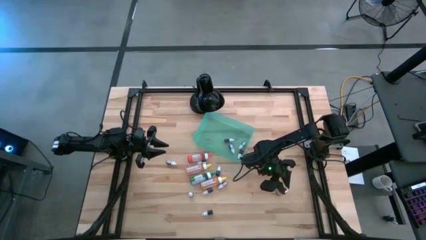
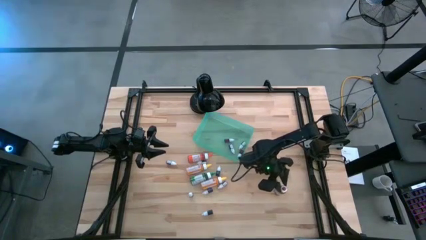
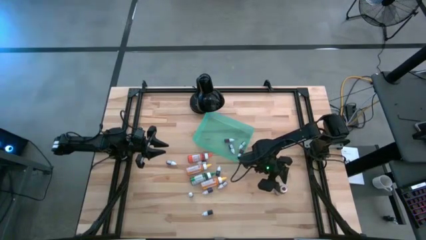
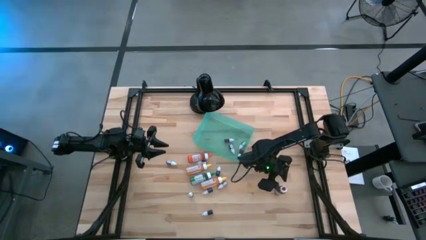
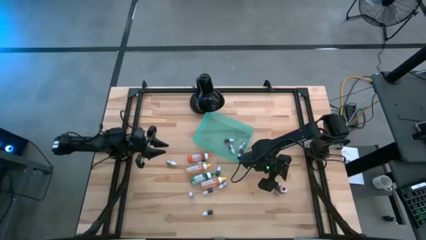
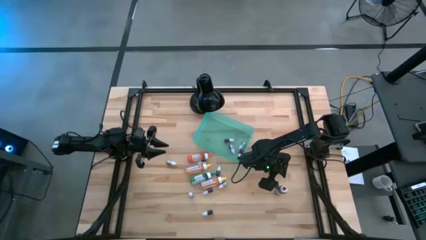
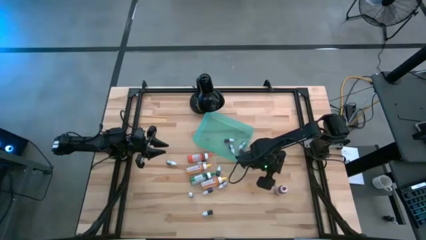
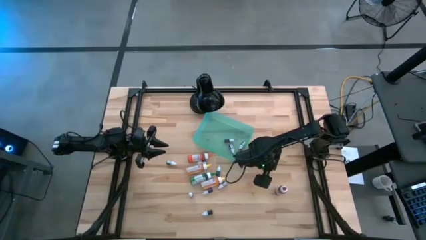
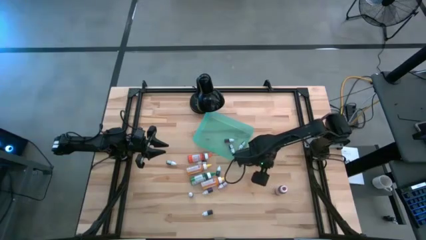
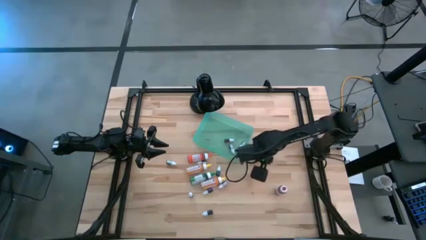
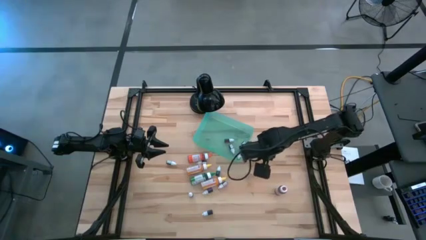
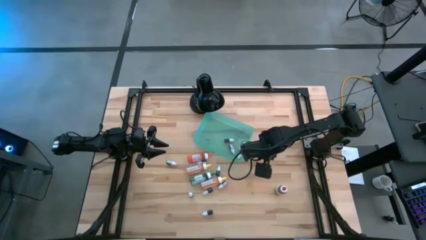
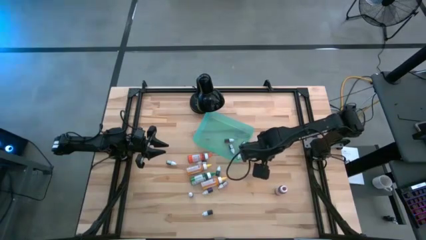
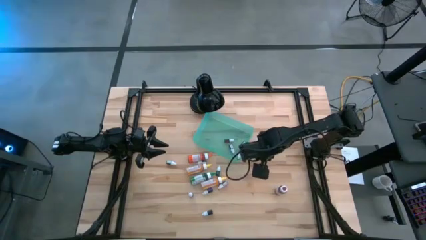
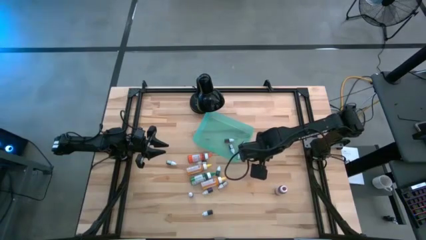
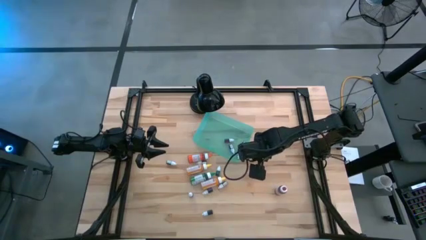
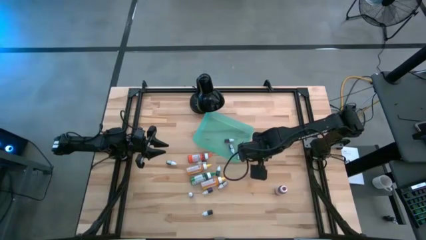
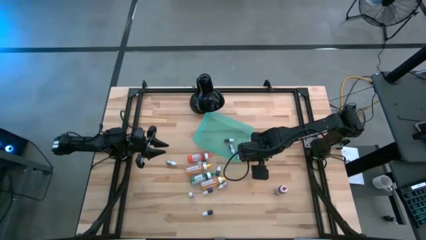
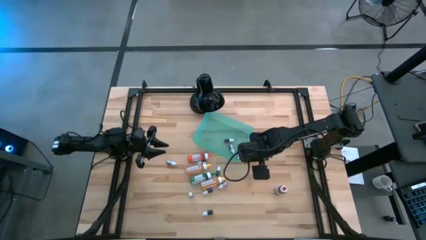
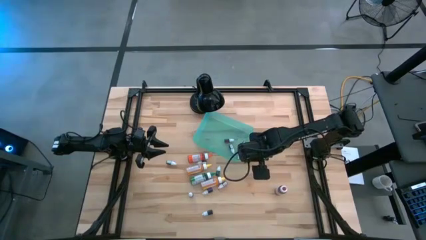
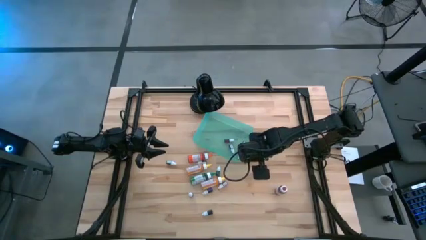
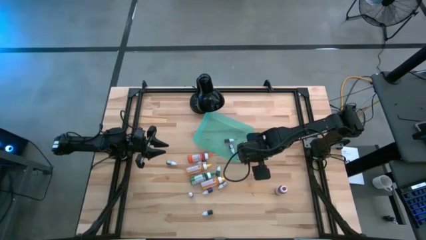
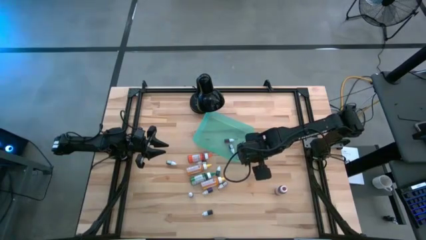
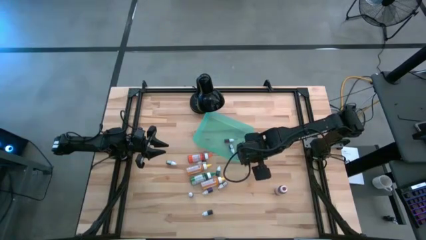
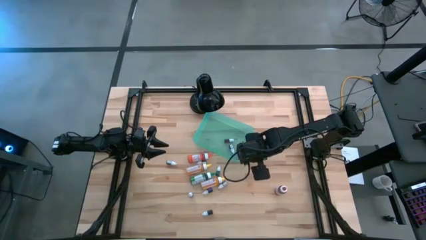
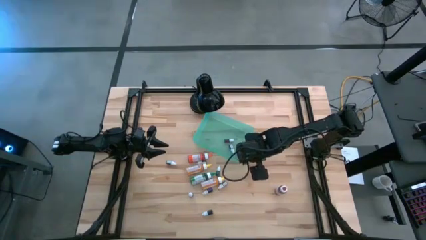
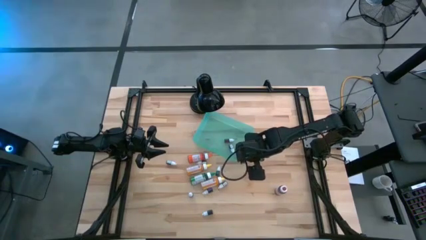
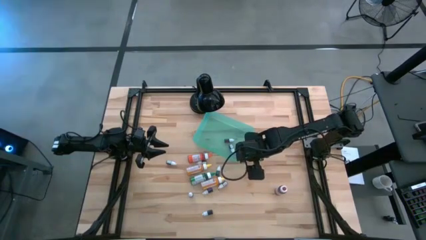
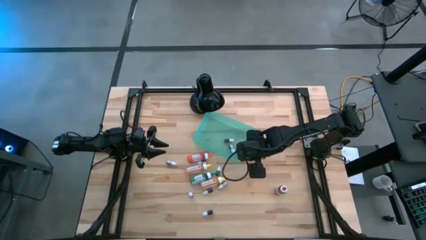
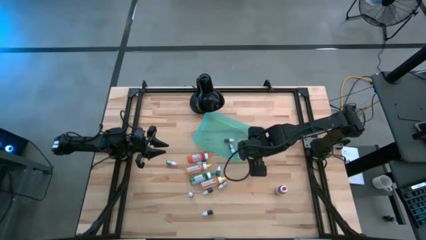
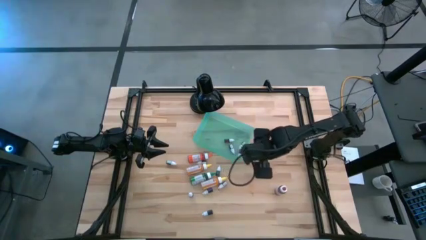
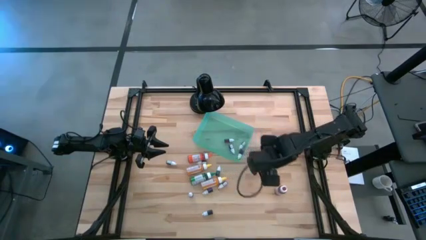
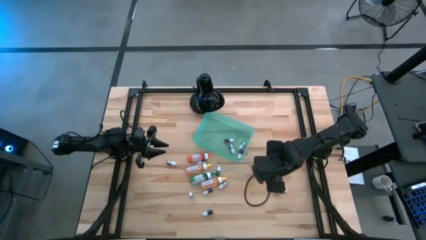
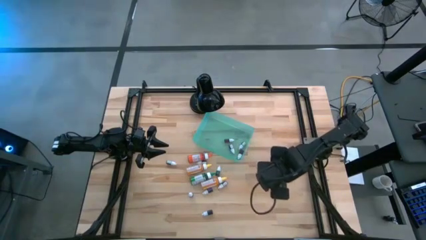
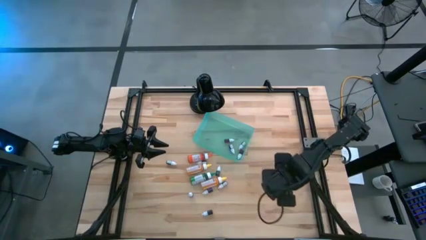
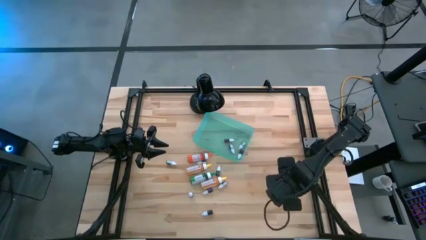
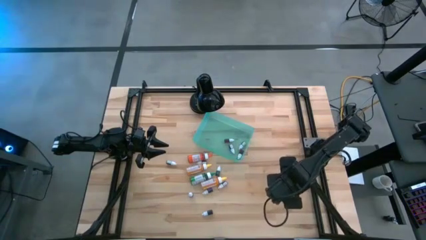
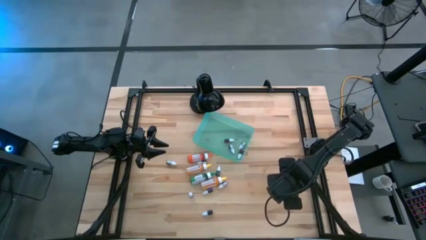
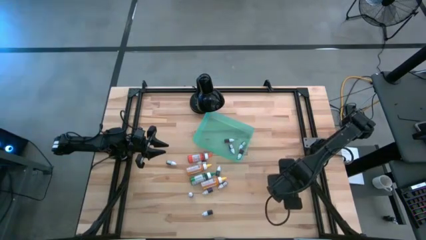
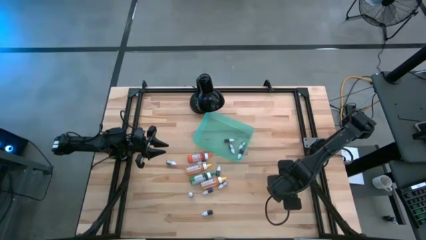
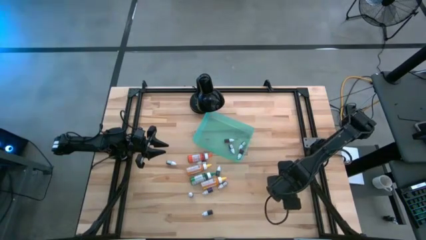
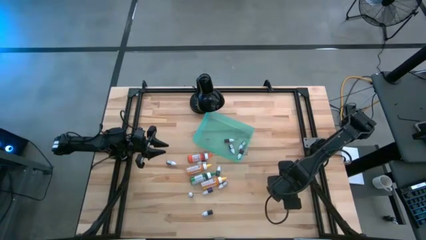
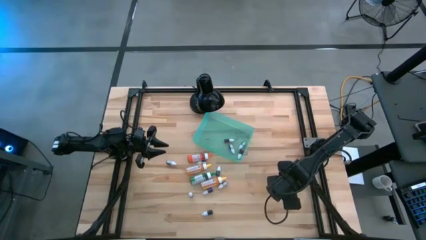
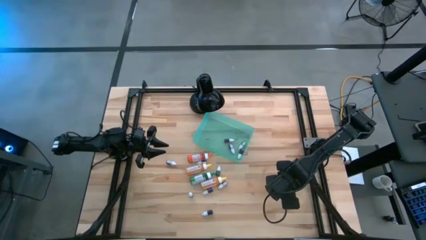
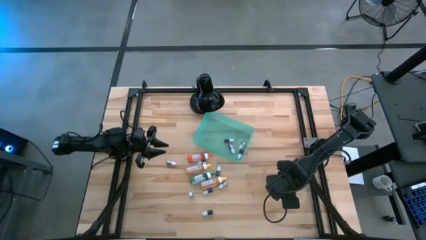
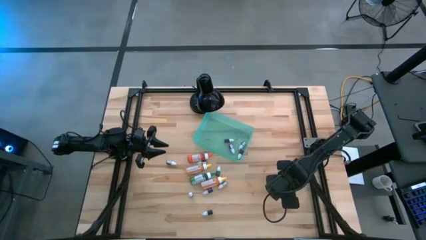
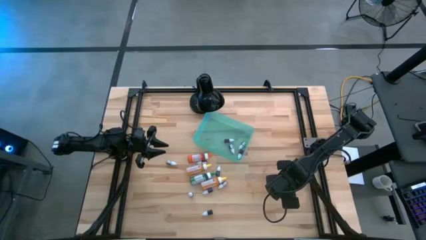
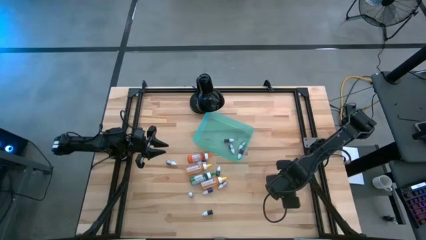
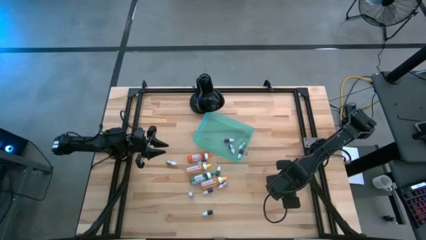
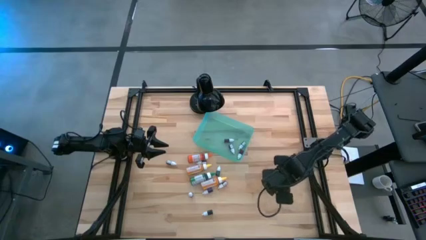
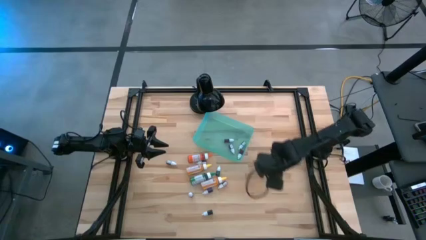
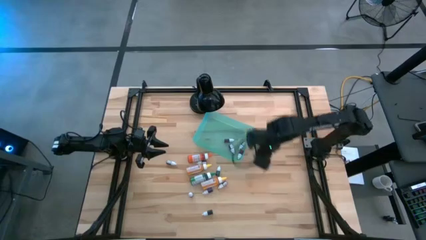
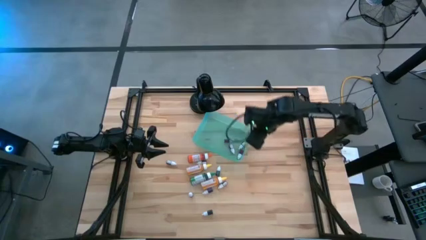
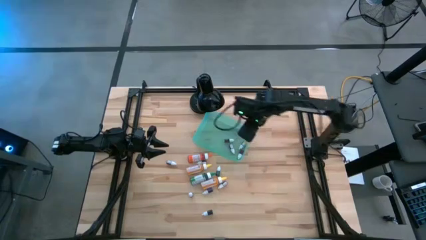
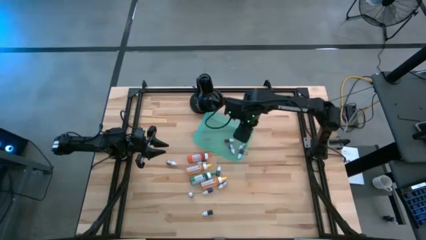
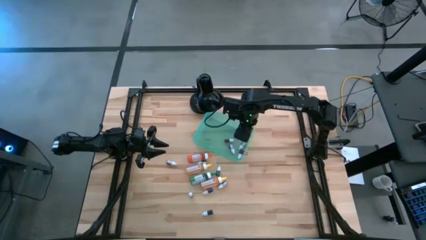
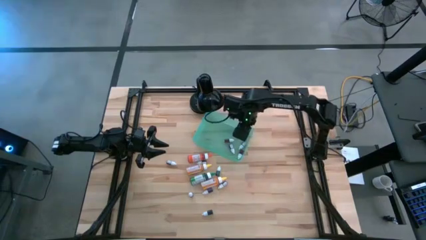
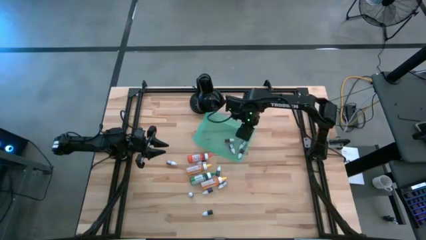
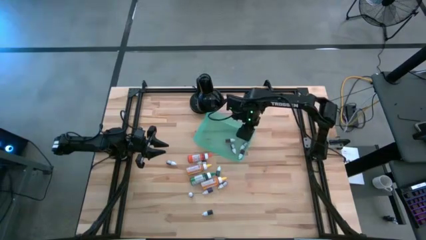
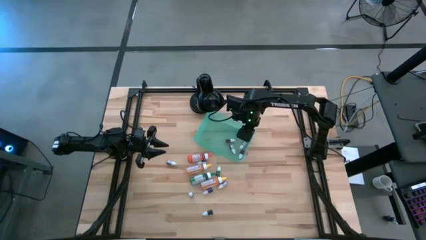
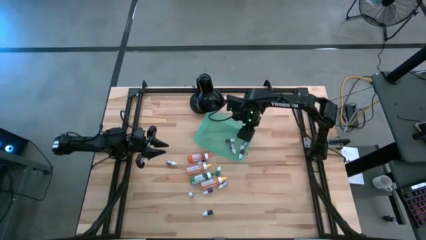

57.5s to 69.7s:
Task: Pick & Place food coloring
Put the large red food coloring bottle into the green bin

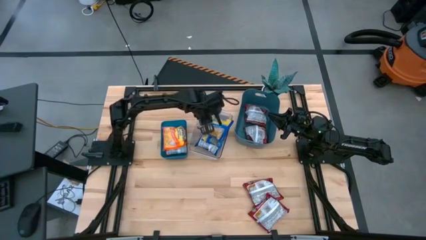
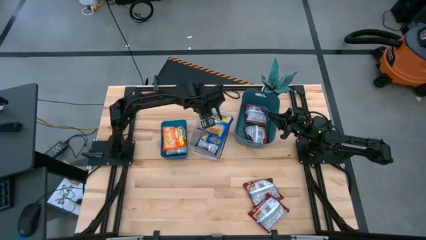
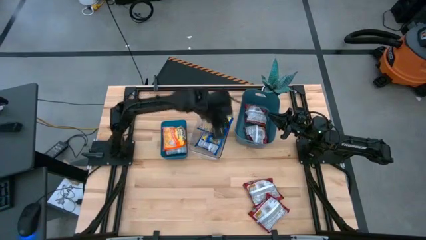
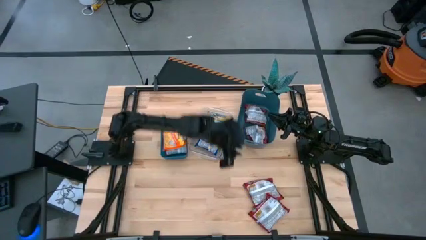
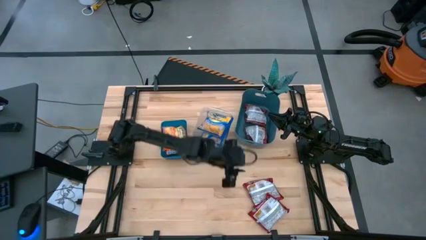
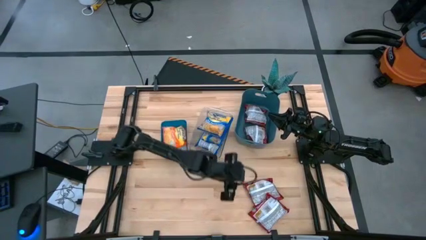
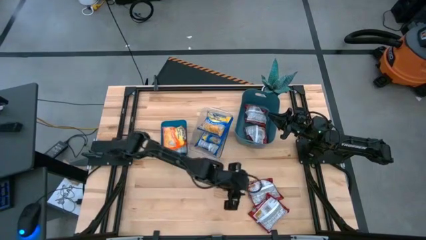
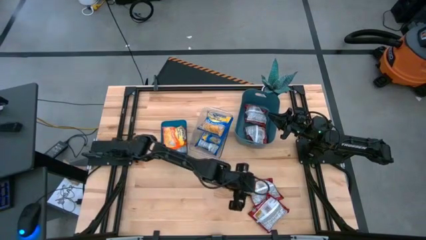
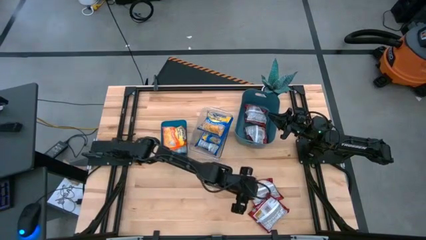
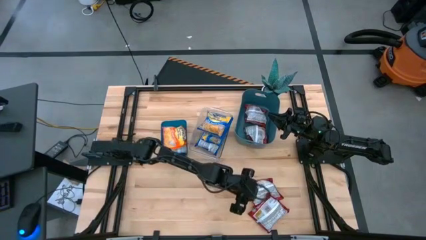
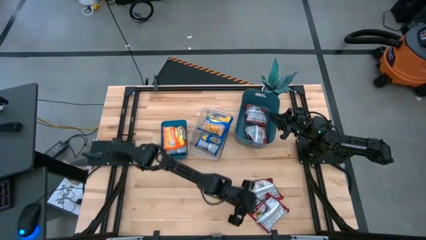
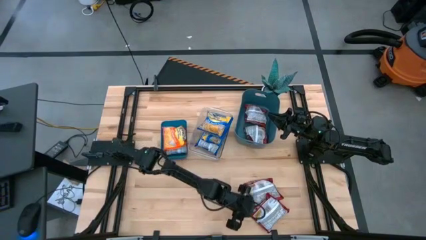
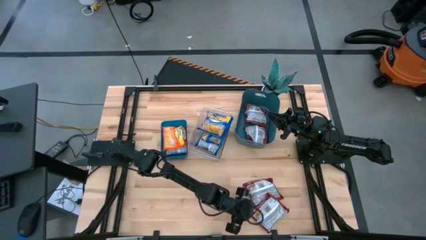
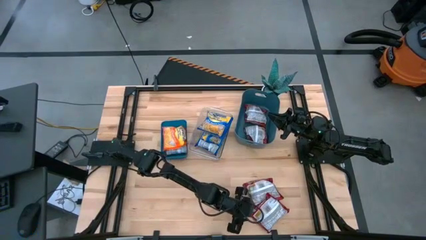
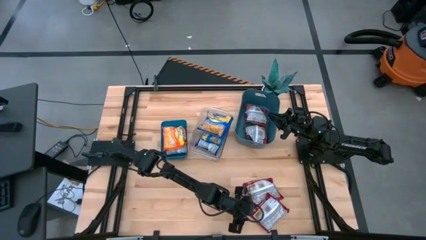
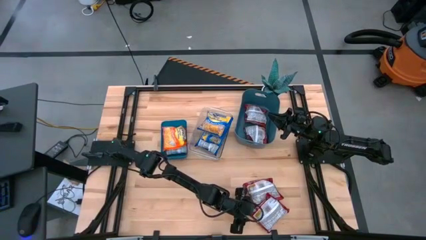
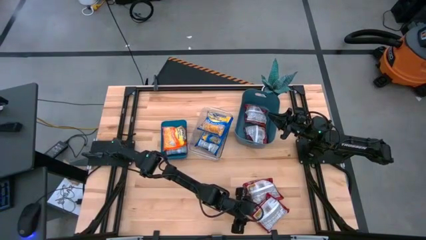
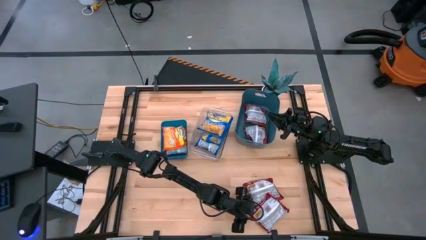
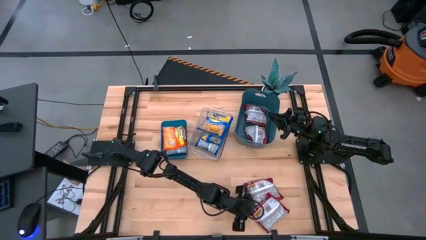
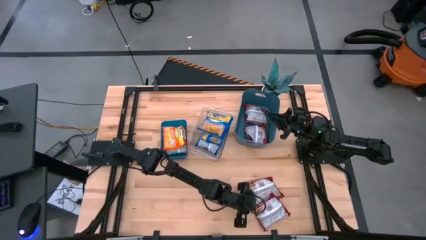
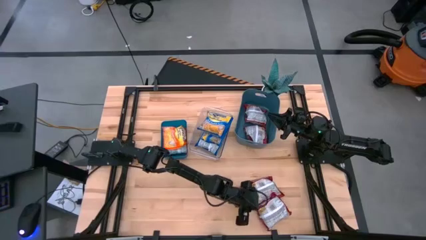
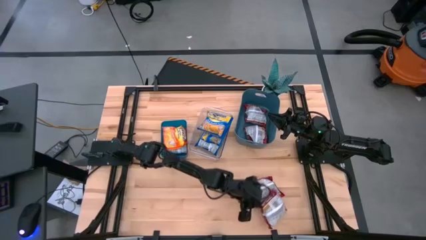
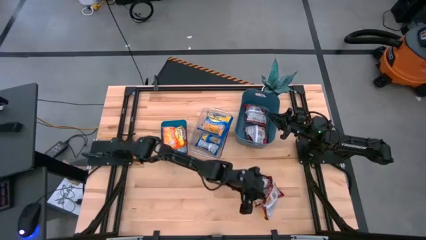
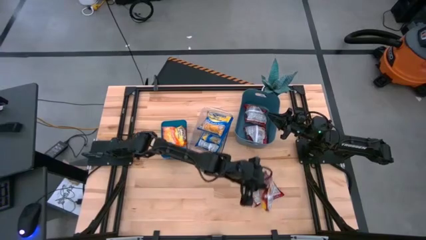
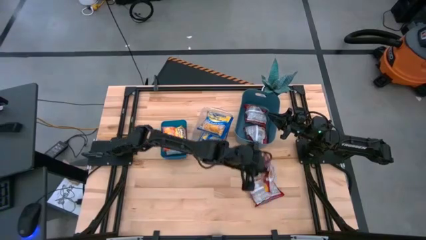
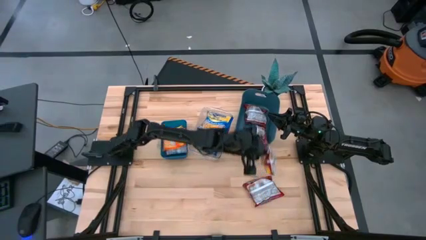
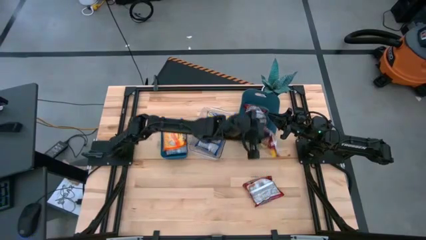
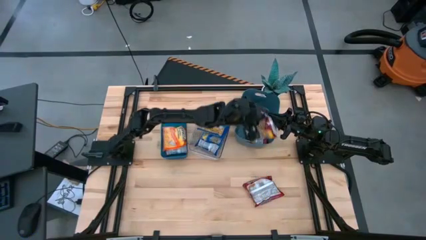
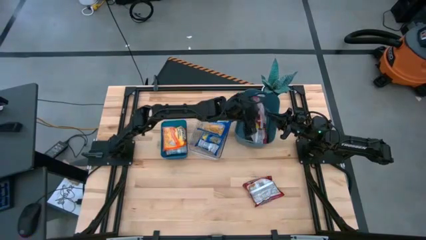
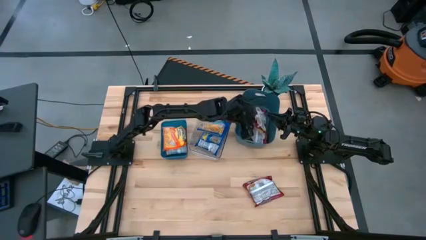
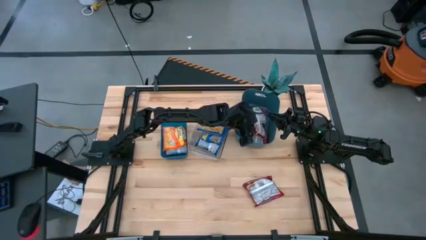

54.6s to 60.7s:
Task: Sort Maruchan noodles
Put the red noodle pack into the dark green bin
